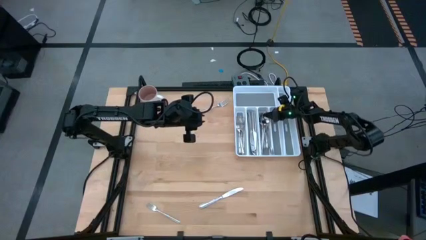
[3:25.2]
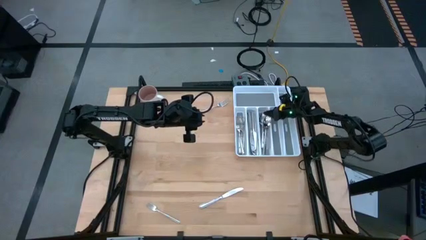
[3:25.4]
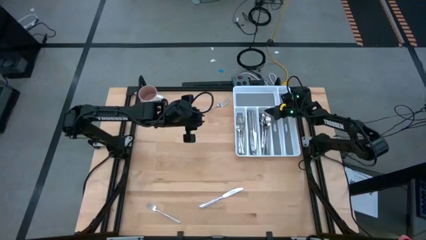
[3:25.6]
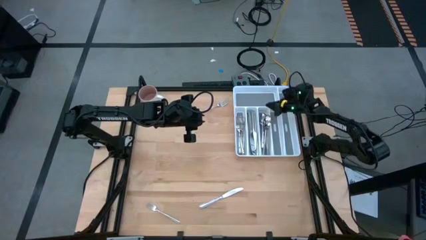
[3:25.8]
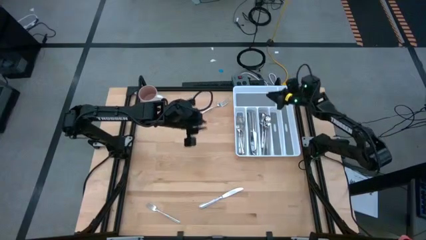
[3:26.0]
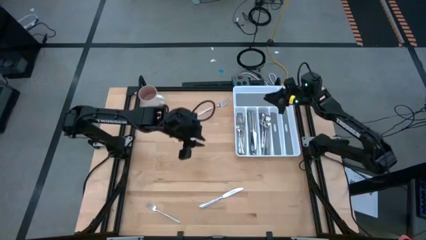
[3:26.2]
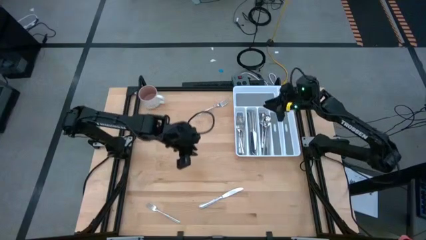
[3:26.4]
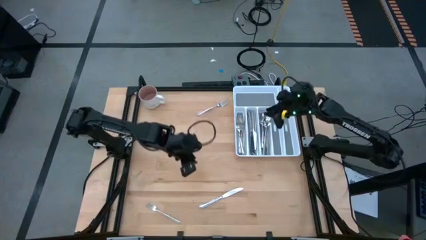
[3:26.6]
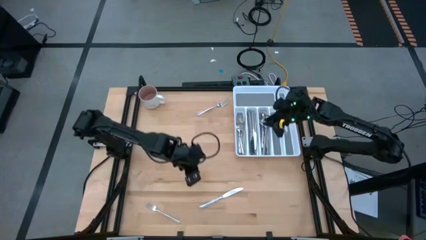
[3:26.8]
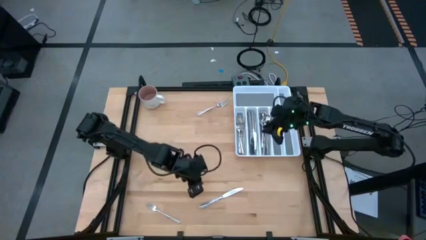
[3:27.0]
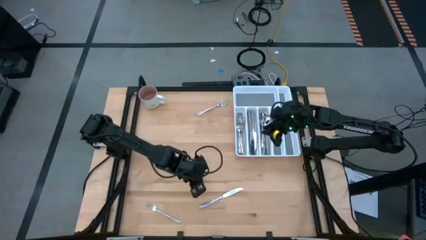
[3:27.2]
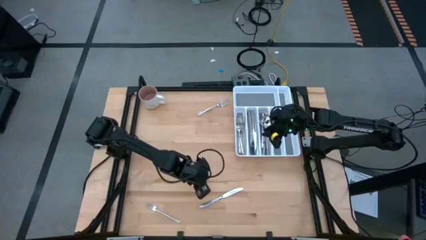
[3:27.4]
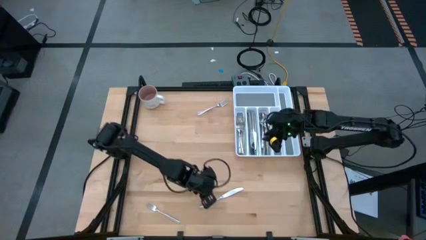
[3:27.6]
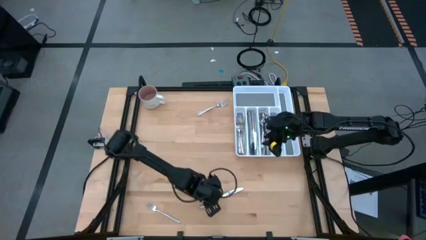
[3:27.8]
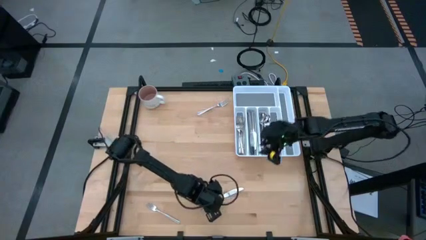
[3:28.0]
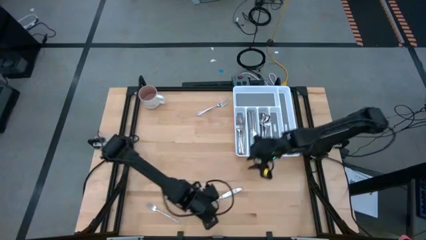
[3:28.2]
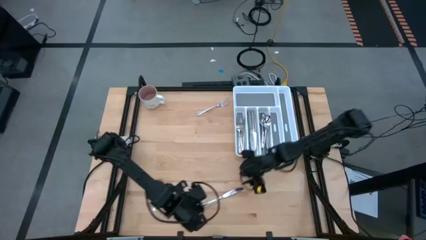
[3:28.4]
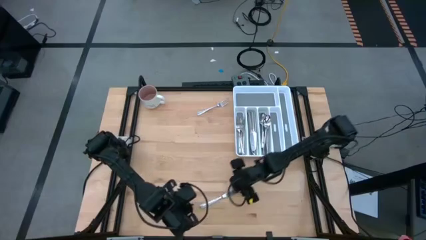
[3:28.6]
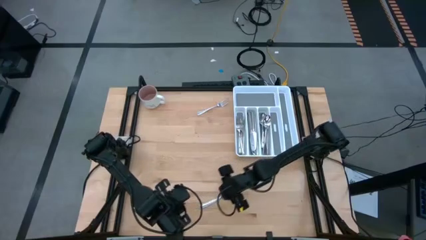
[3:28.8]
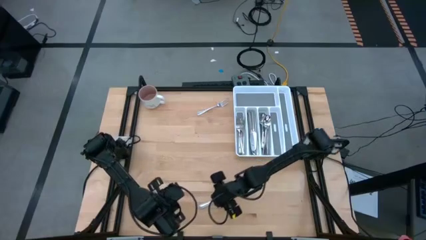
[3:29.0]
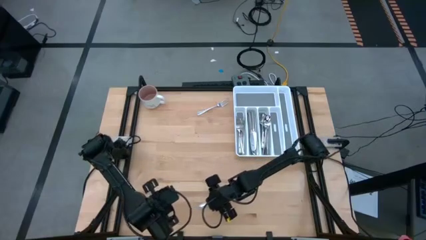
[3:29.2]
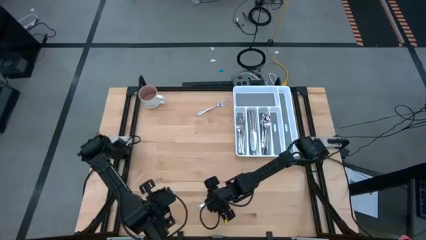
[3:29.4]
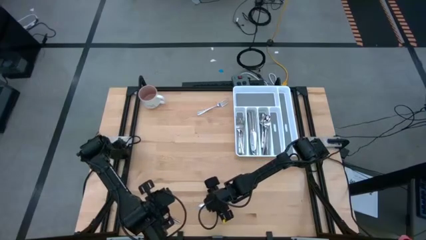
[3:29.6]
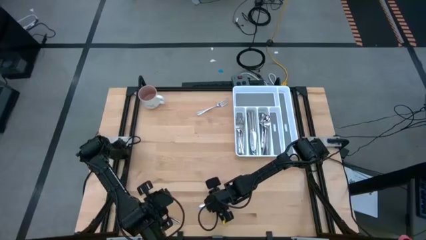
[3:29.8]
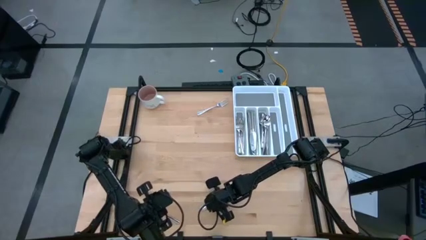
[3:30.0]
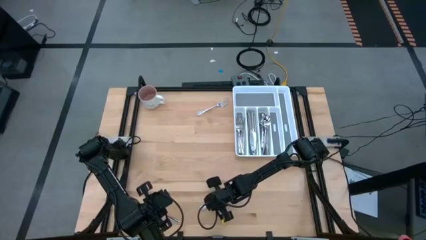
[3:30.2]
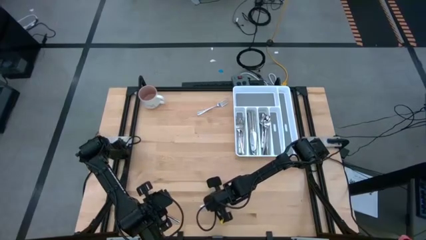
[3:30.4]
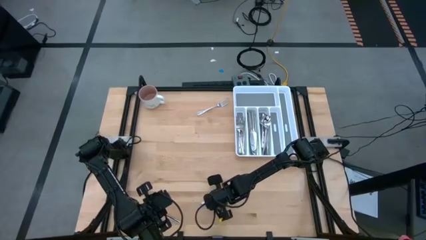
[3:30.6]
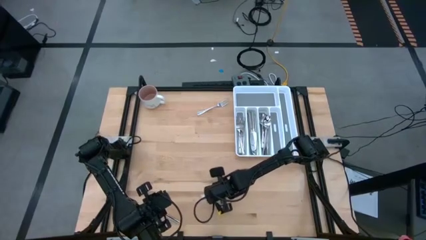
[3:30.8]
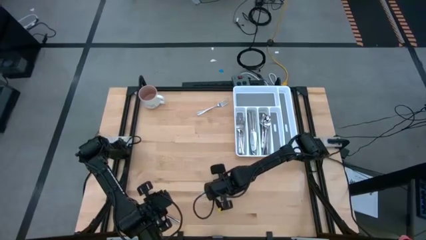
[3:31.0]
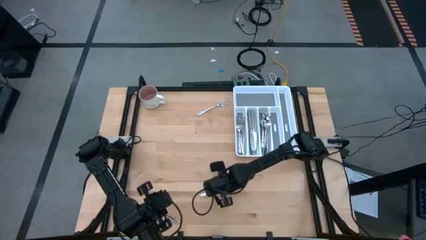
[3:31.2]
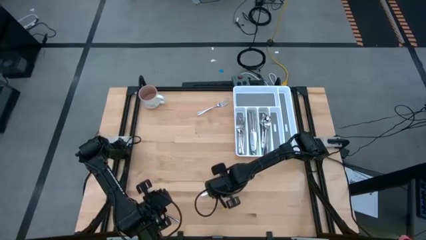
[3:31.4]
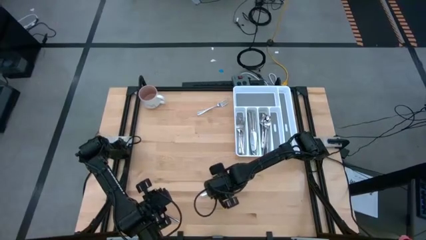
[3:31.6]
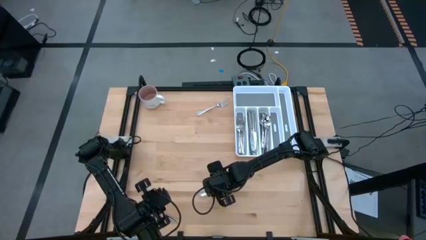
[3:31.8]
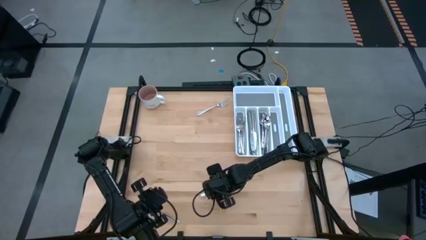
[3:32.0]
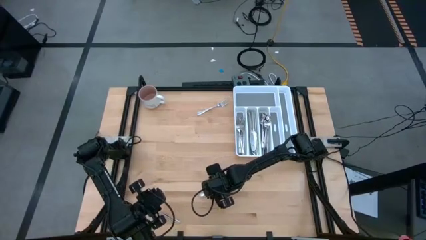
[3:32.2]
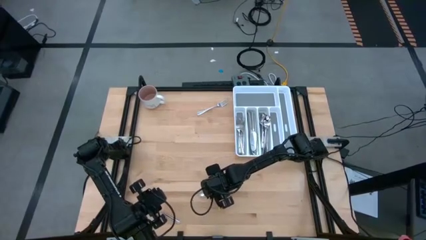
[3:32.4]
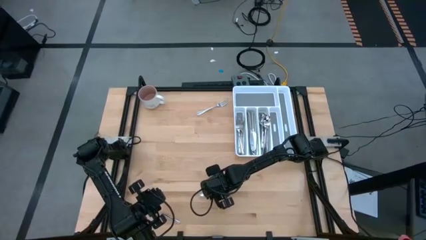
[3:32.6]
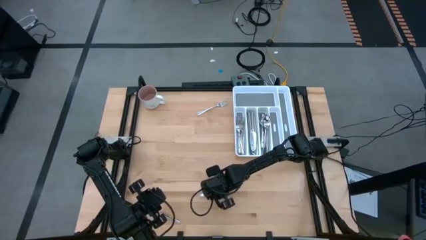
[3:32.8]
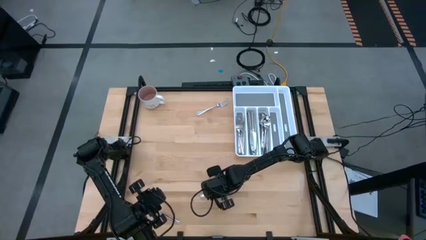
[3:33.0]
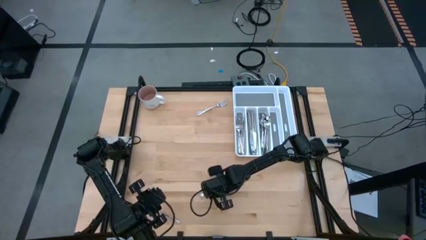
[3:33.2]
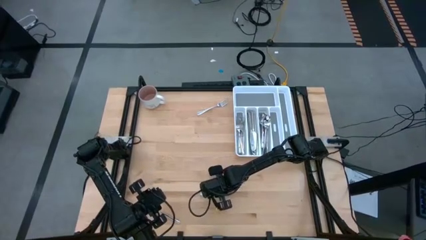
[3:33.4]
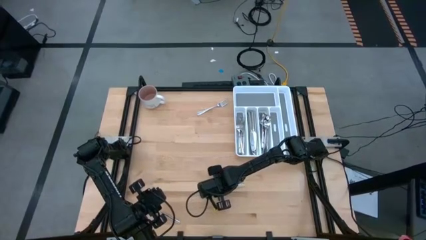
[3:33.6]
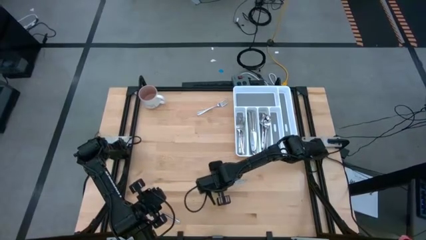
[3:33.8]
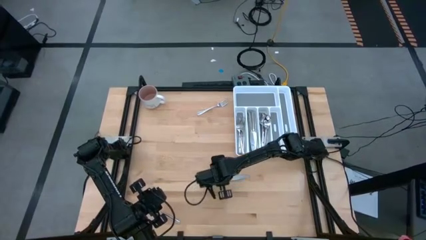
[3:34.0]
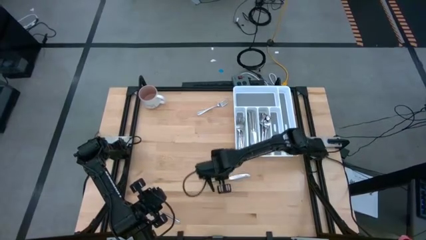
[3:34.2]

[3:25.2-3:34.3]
Task: Sort silverware
Put the silver knife into the middle left slot of the white silverware tray

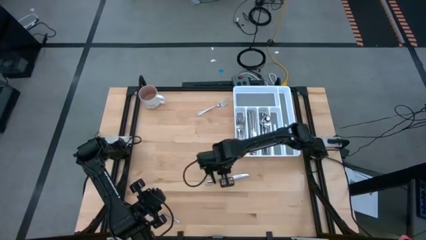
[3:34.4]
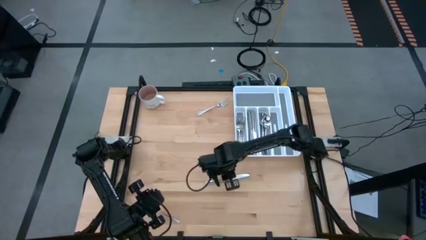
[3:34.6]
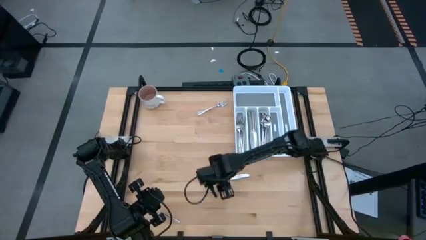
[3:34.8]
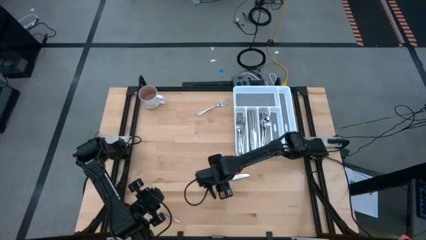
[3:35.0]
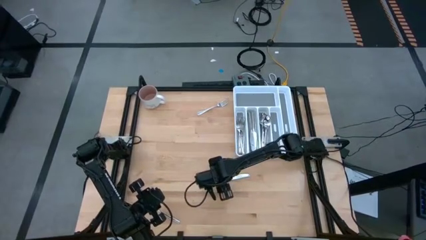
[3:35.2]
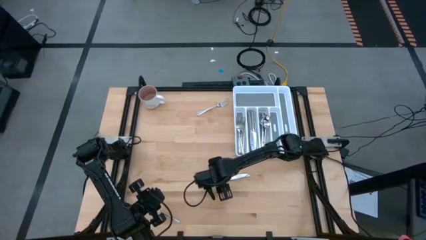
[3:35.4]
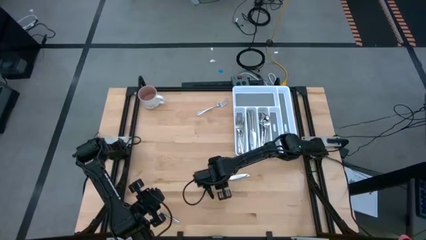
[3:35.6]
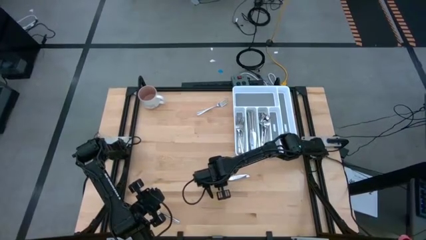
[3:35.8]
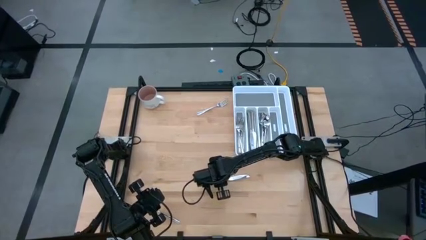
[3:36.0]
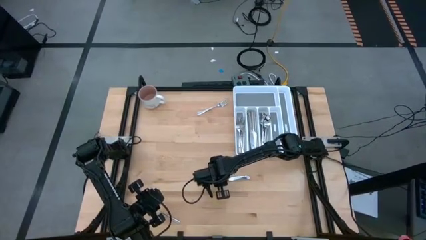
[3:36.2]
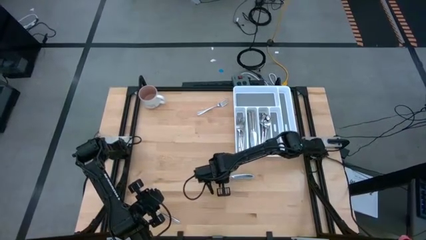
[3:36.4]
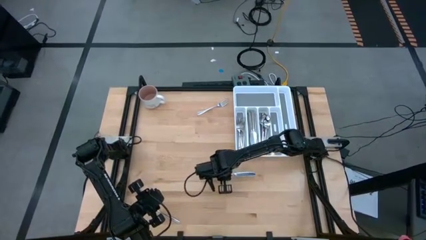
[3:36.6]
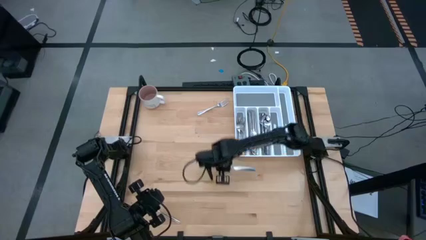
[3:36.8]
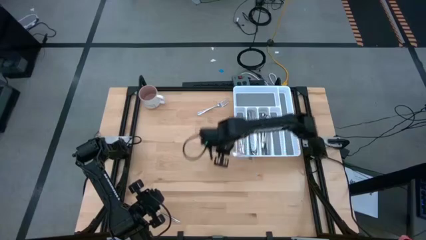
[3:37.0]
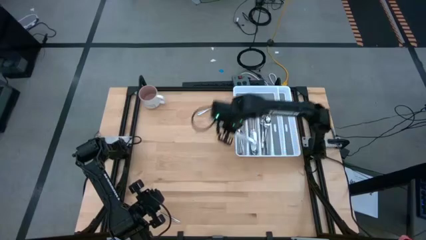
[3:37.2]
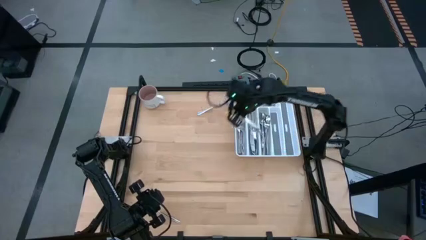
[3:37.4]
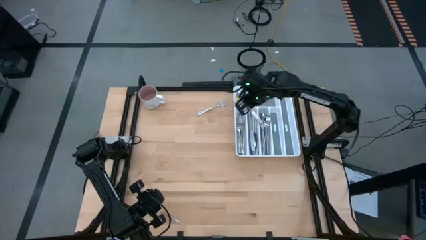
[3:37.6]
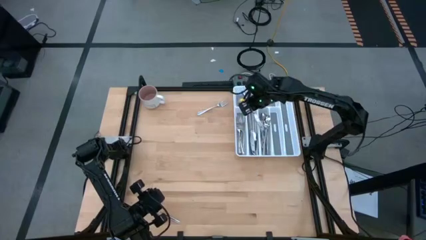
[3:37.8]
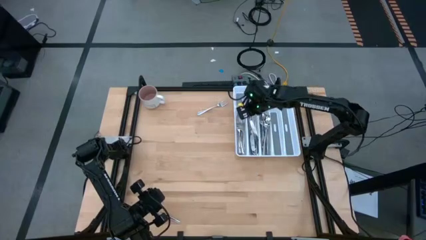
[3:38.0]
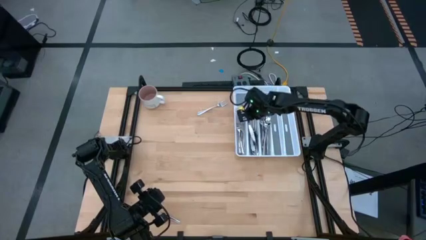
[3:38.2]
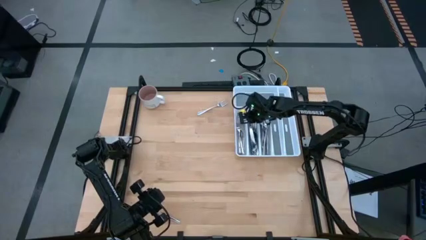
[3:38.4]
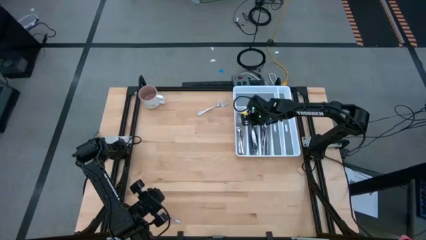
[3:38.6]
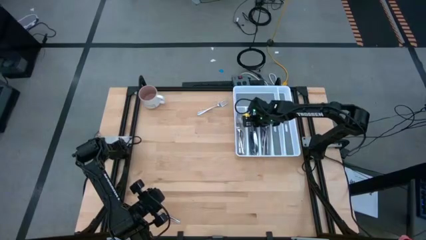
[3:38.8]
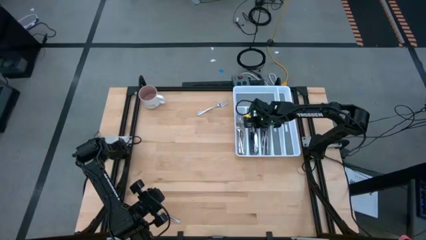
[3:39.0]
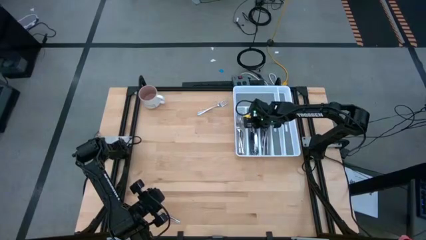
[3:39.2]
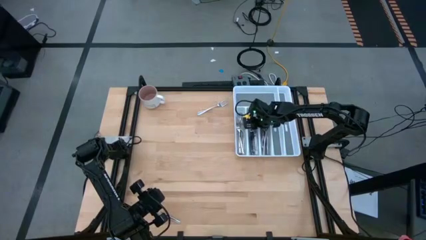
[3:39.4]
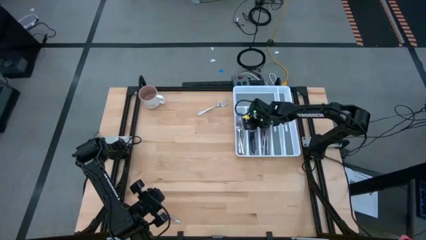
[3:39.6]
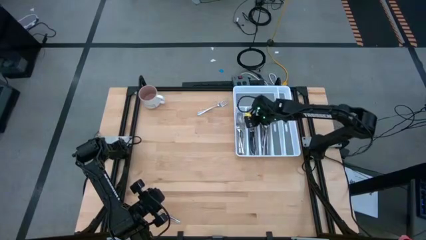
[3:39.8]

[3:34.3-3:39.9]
Put the silver knife into the middle left slot of the white silverware tray
